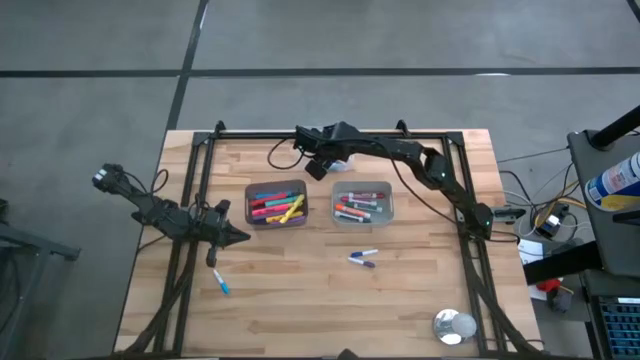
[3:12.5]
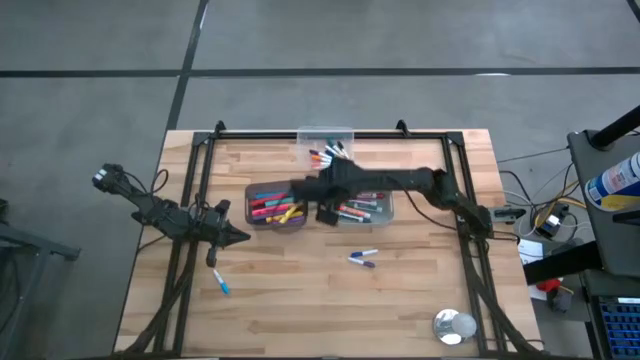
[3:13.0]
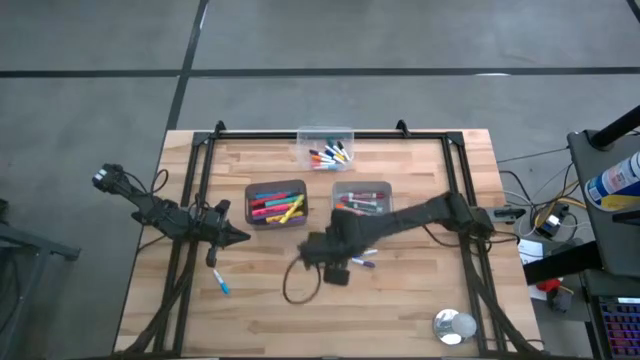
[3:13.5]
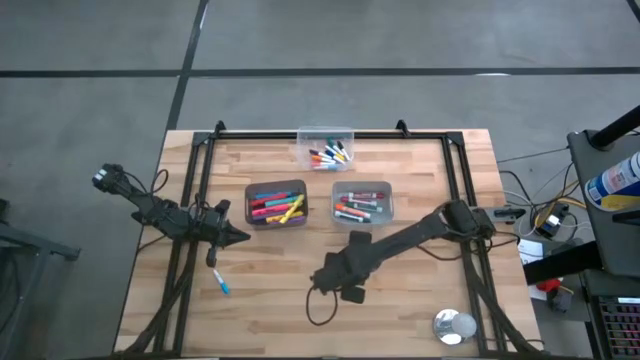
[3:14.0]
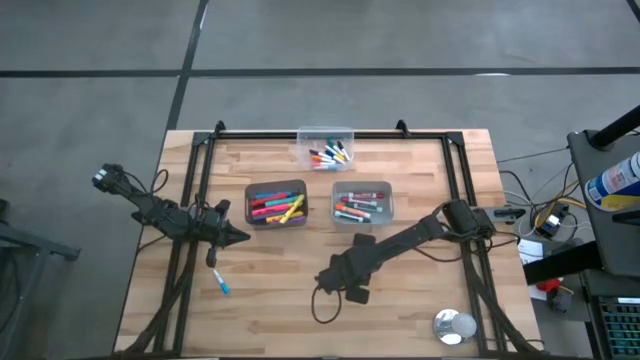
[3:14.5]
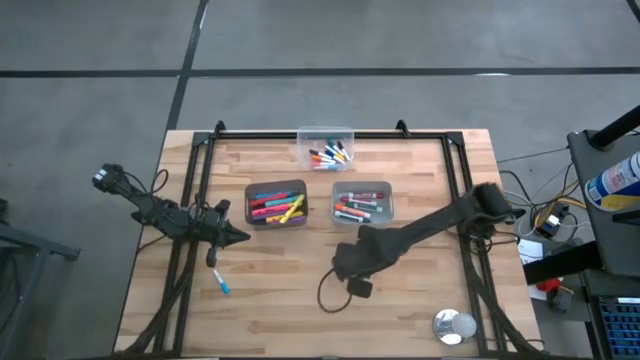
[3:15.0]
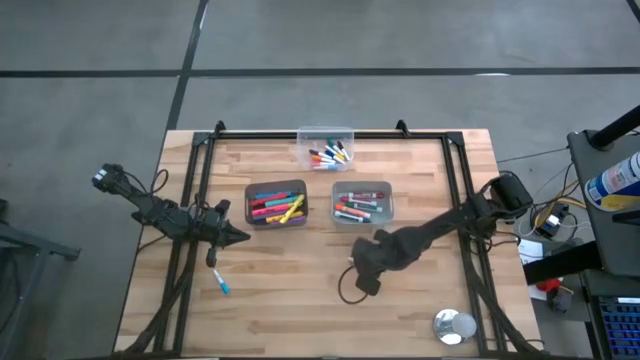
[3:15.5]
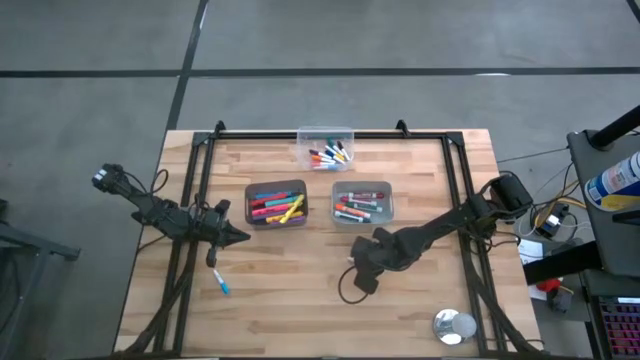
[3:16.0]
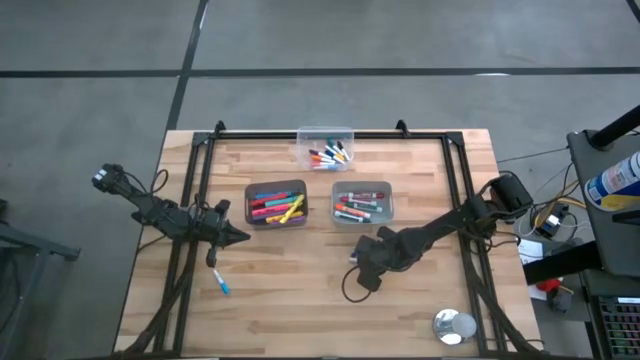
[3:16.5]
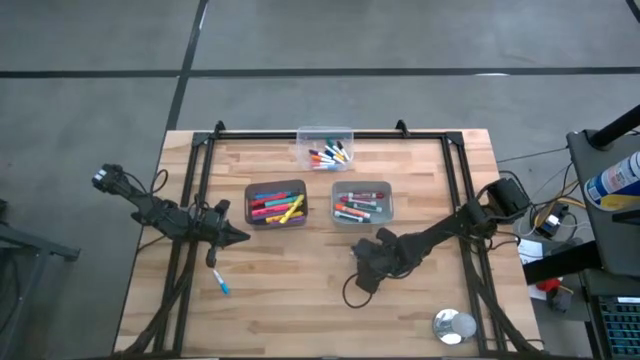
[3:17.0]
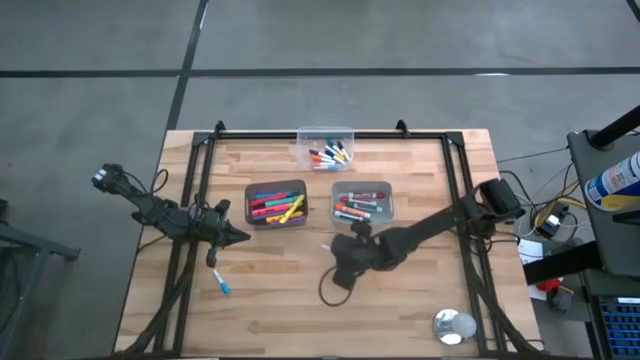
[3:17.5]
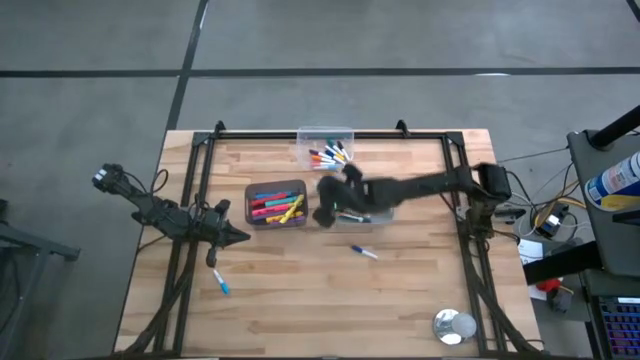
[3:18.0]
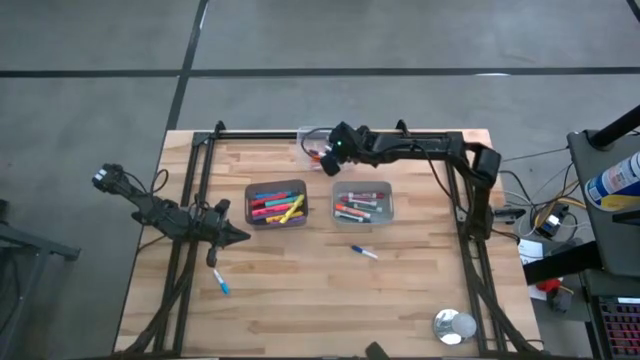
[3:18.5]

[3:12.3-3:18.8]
Task: Pick & Place Markers
Put the small purple highlighter pen into the transparent bin

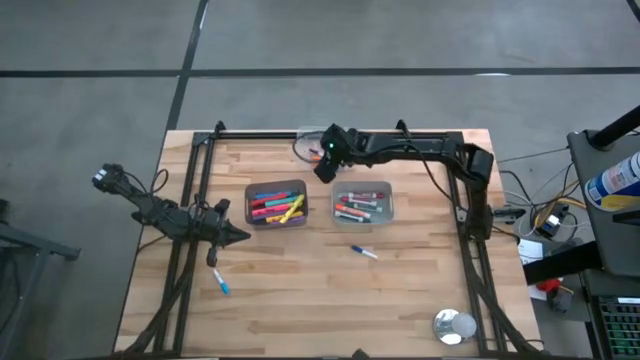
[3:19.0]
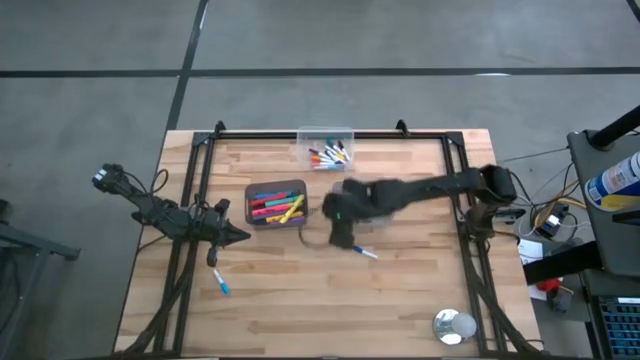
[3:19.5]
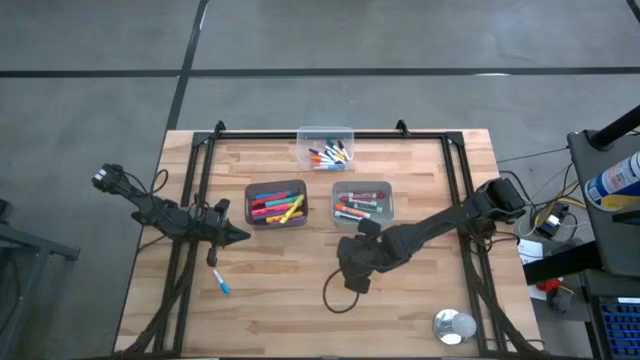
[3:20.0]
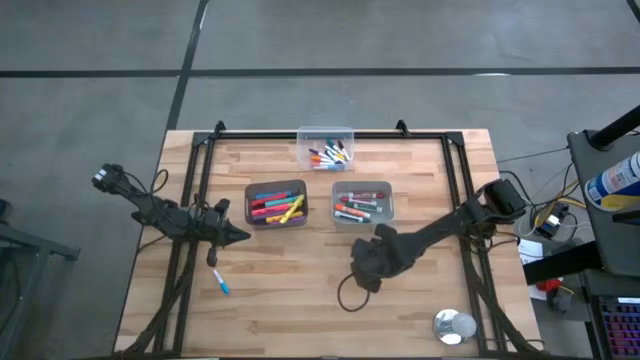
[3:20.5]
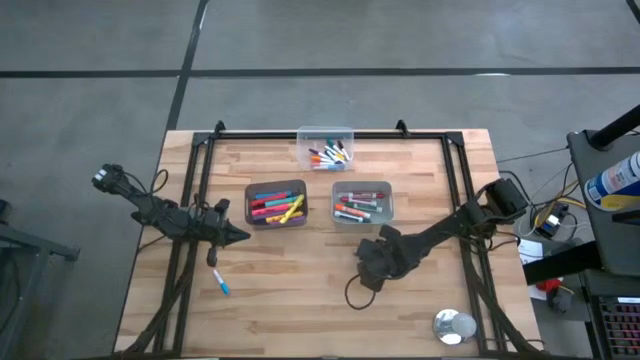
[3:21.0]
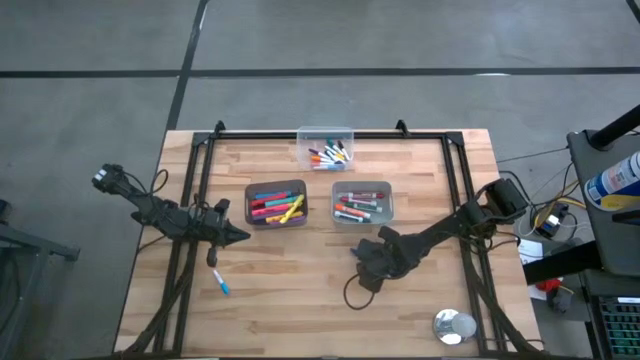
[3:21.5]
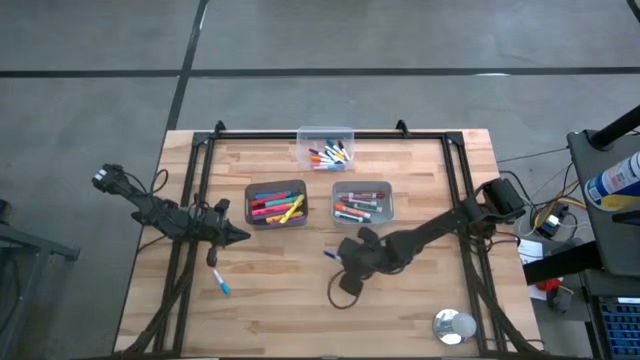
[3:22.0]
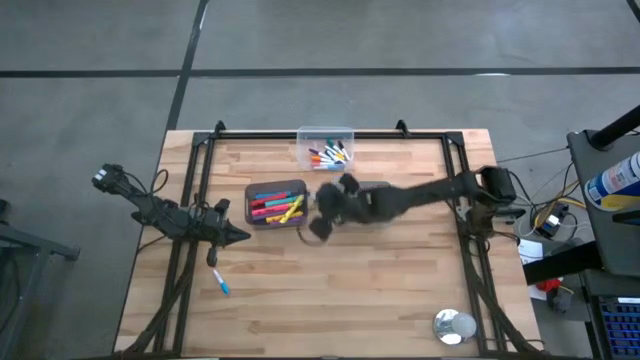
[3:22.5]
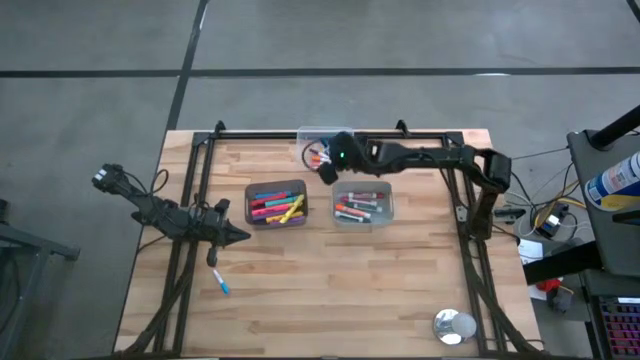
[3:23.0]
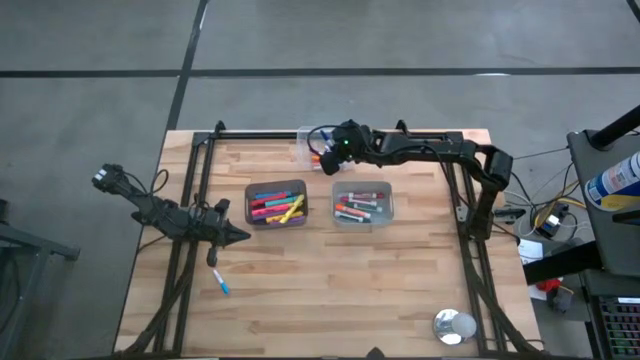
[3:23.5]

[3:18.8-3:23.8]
Put the small dark blue highlighter pen into the transparent bin

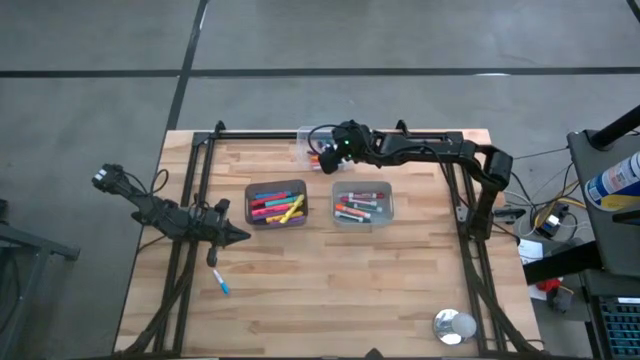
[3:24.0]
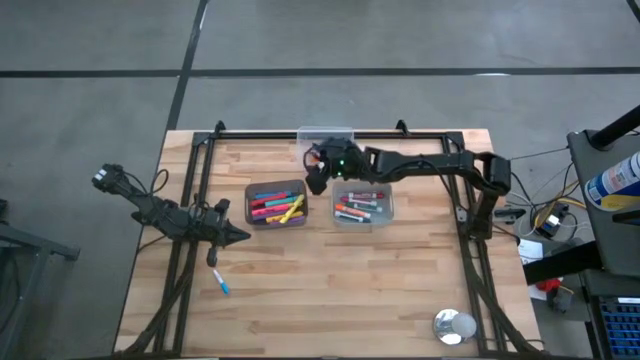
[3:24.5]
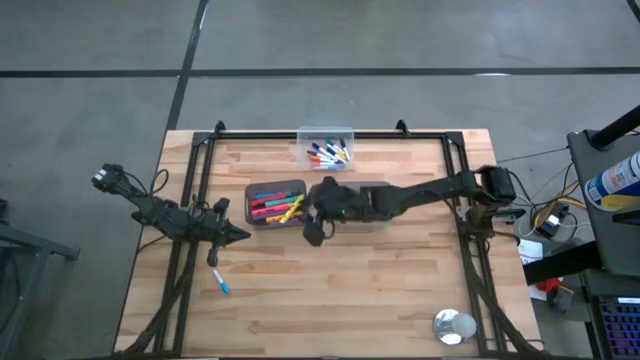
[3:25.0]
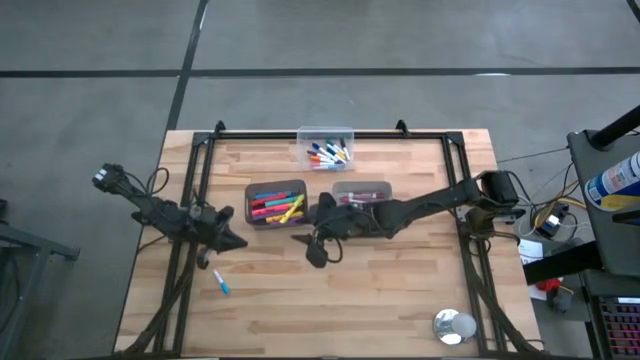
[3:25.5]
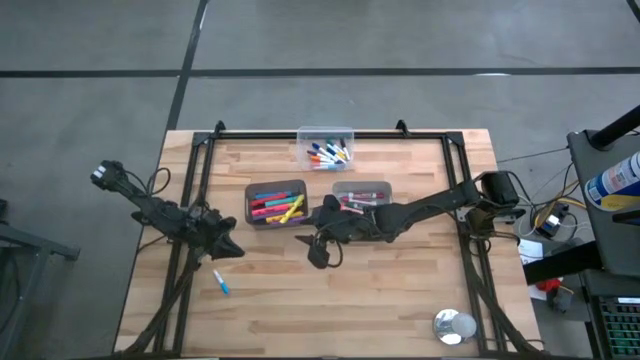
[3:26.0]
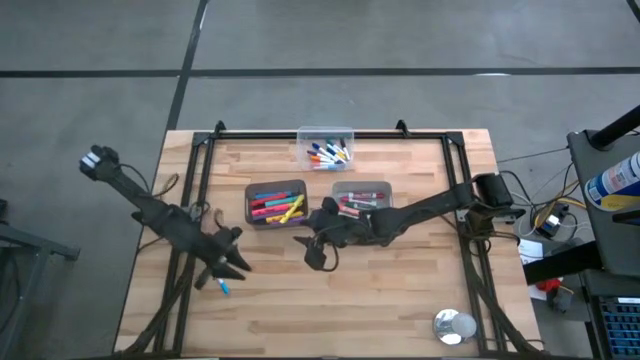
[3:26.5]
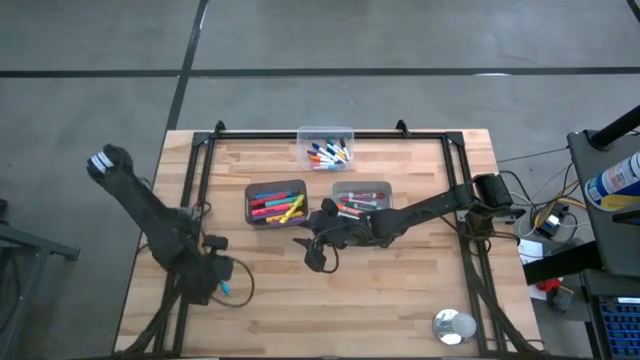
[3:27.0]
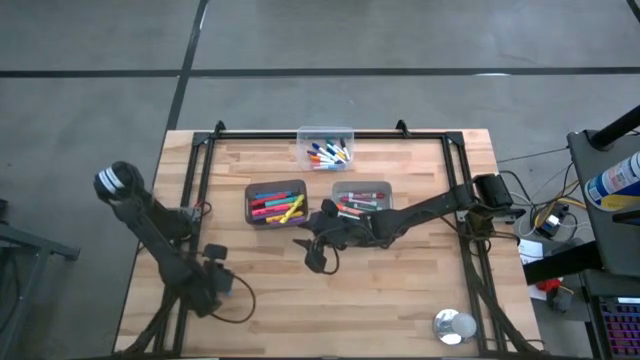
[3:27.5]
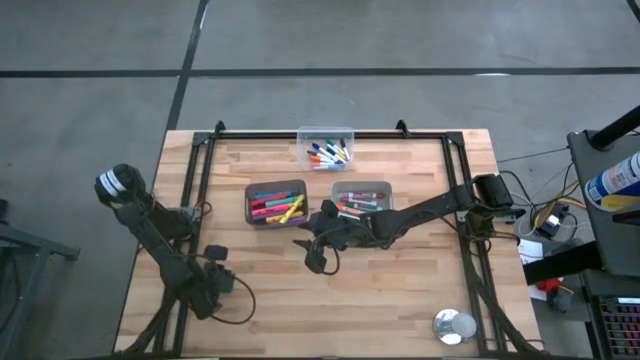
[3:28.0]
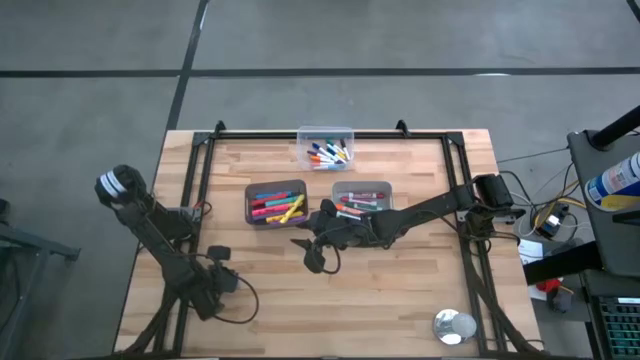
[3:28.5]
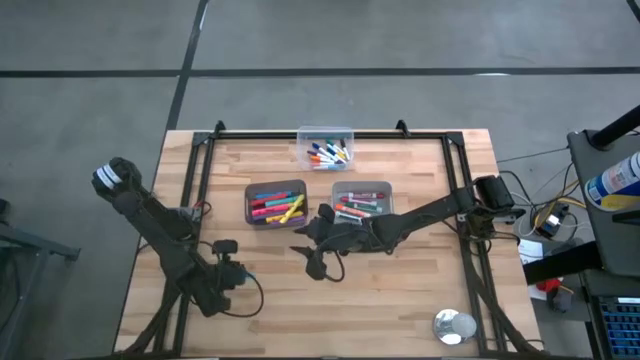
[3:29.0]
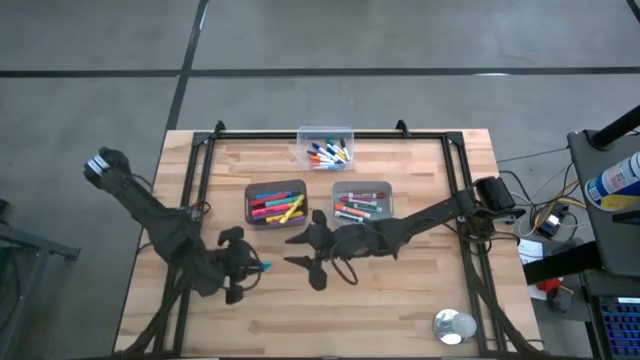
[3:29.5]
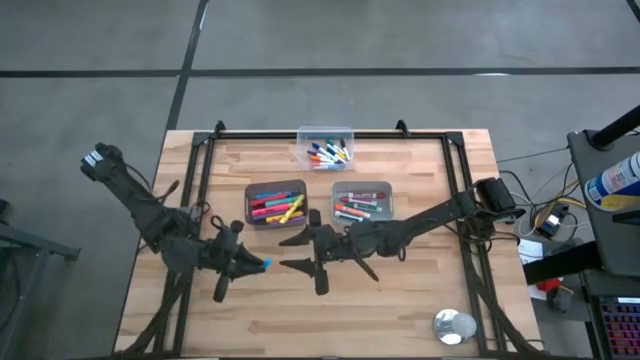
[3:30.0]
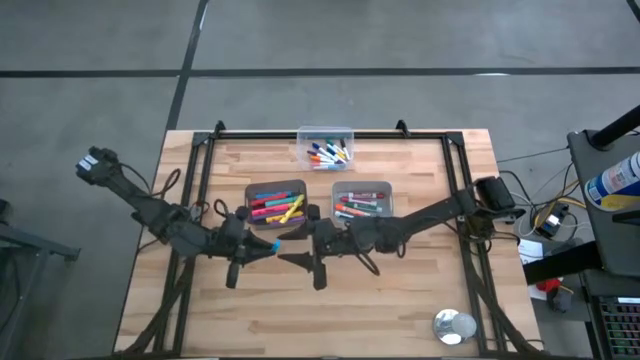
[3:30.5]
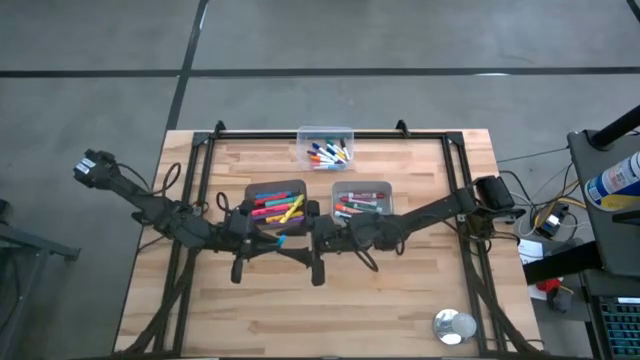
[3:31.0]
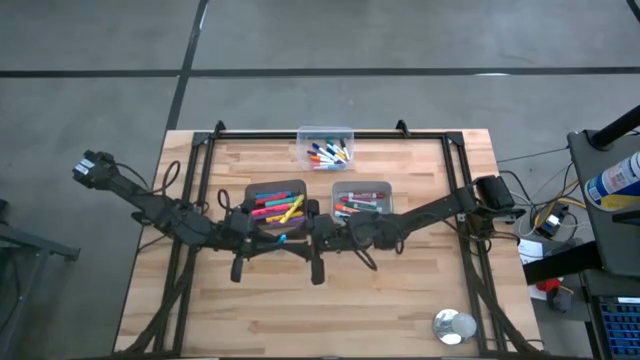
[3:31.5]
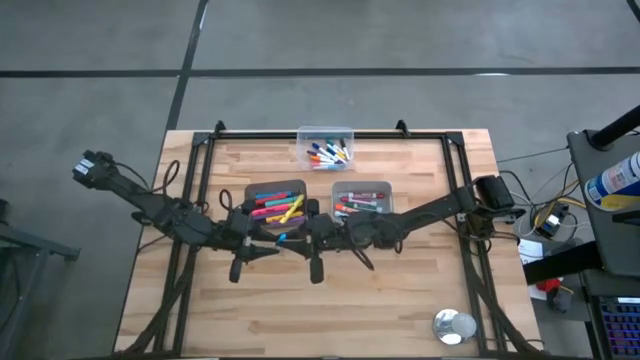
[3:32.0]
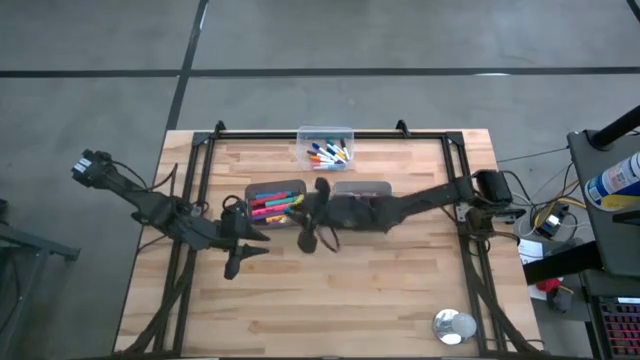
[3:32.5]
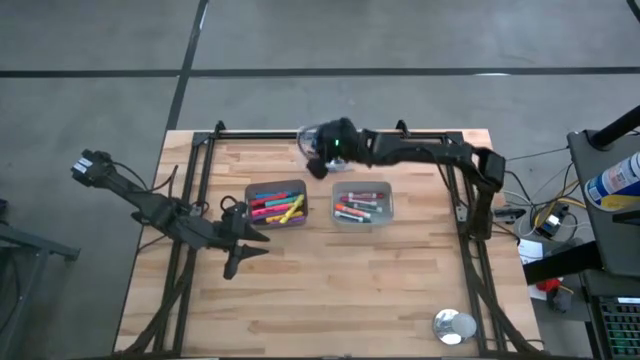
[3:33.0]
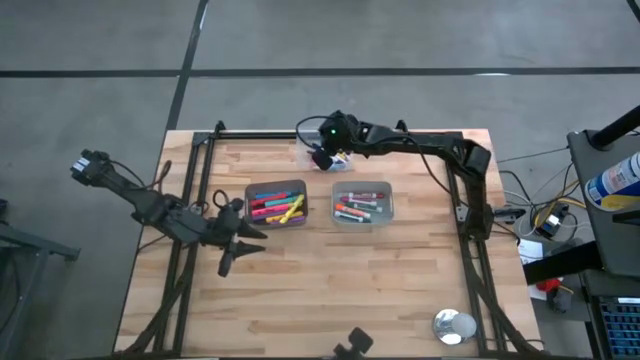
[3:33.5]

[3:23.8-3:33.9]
Put the small light blue highlighter pen into the transparent bin
